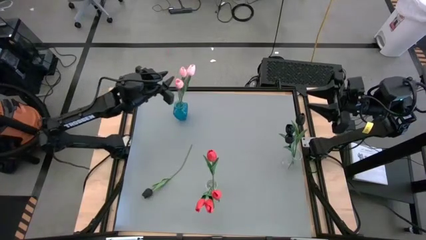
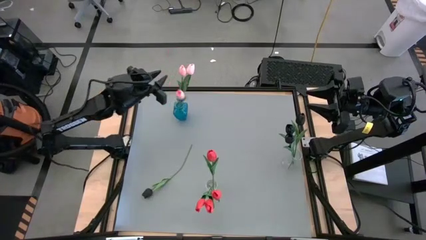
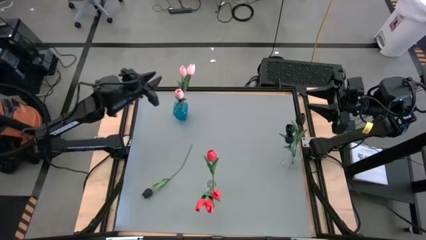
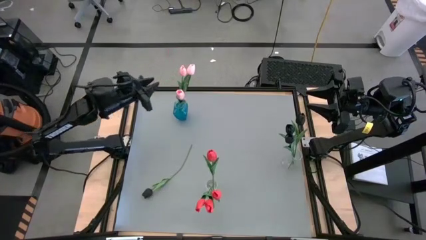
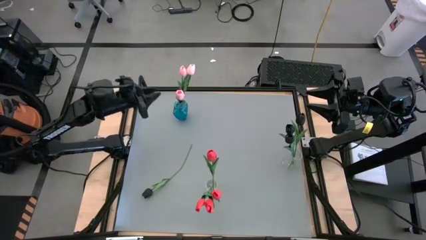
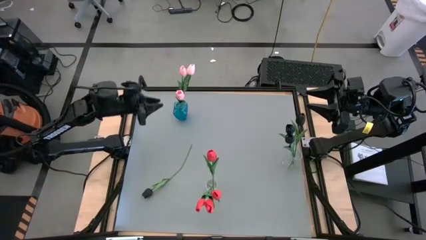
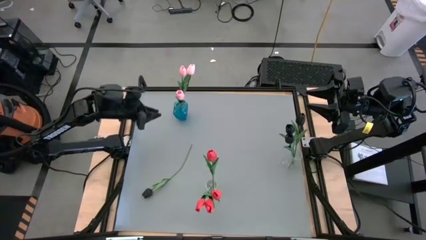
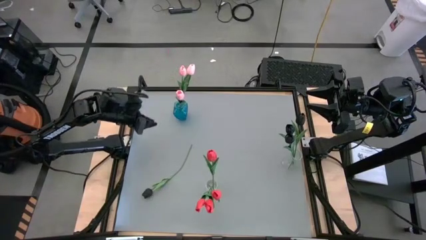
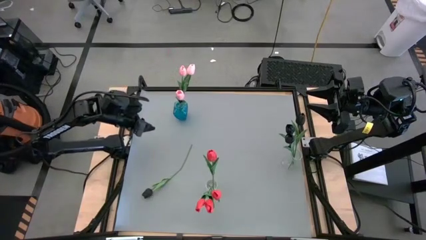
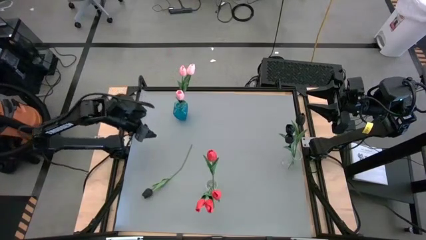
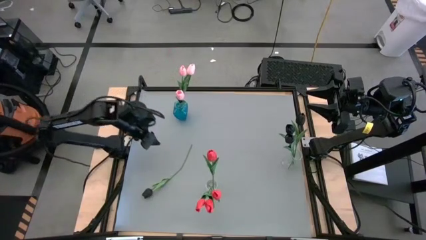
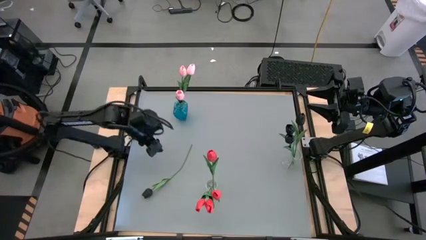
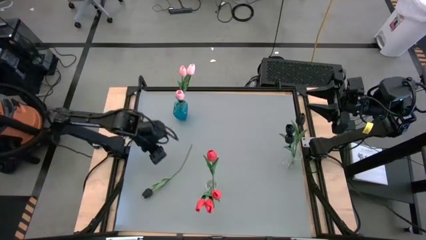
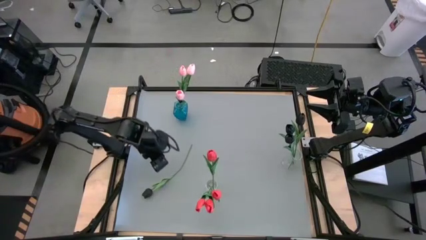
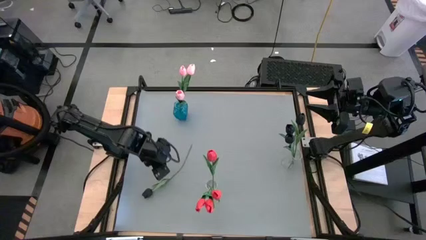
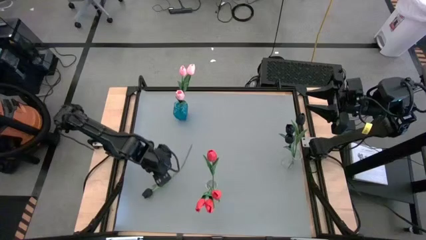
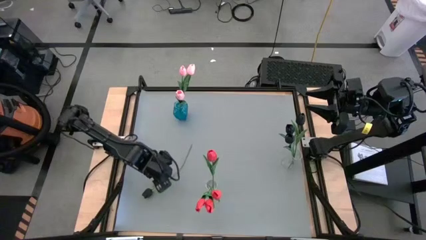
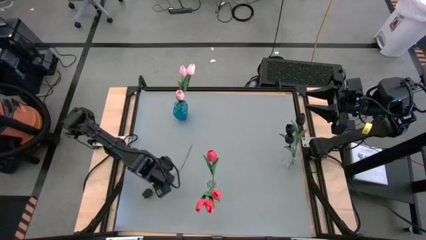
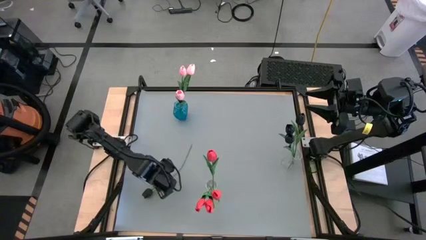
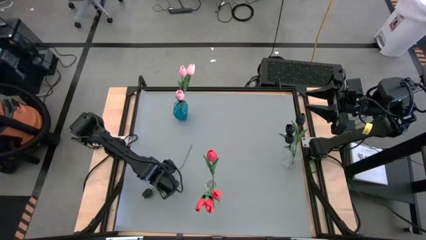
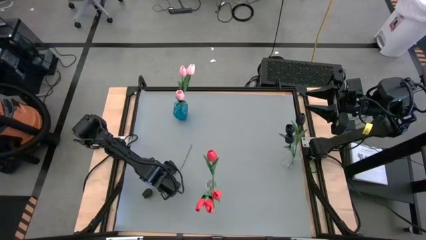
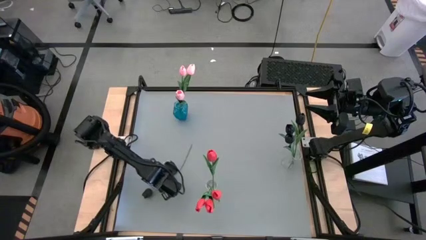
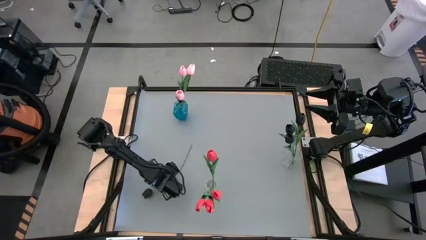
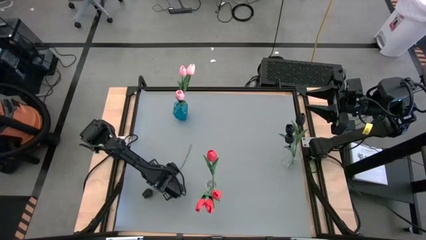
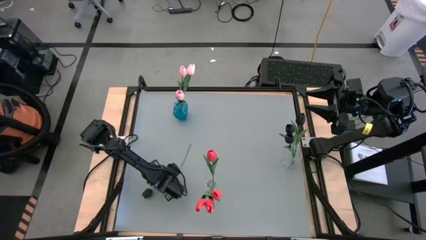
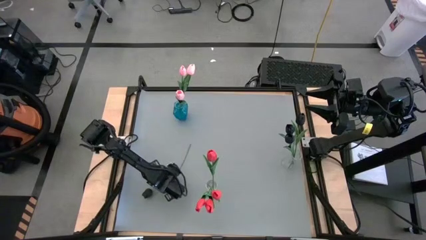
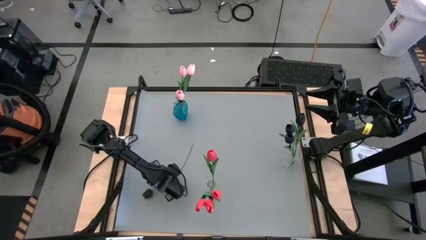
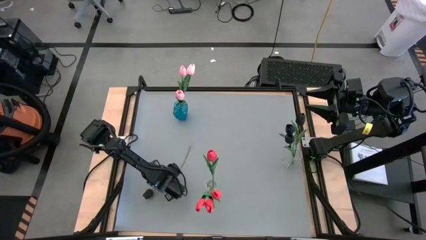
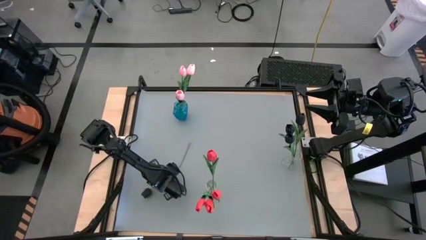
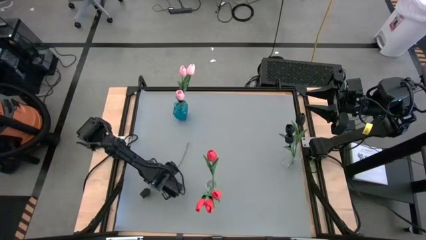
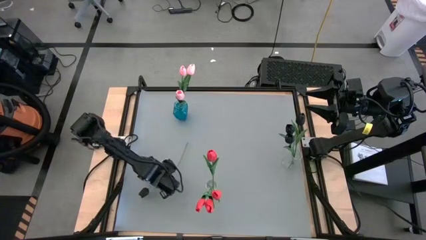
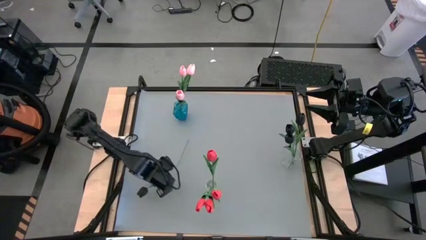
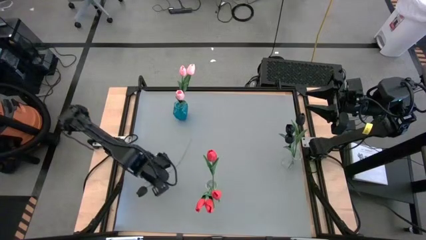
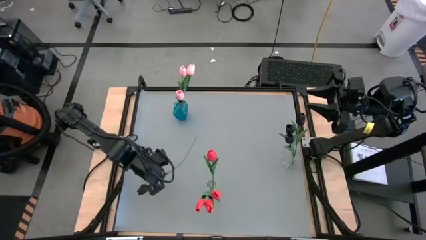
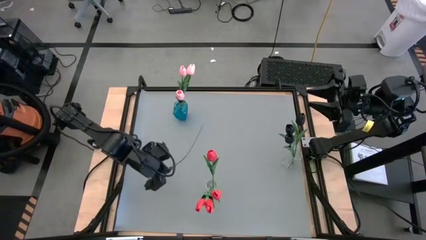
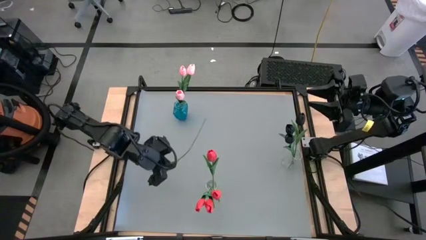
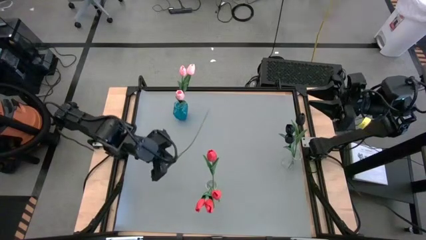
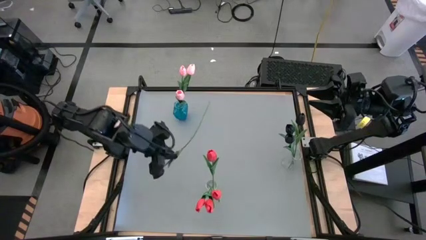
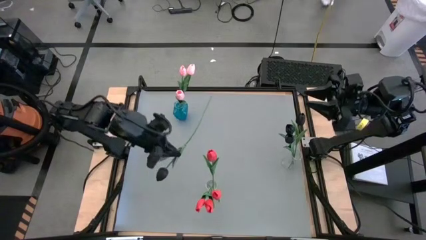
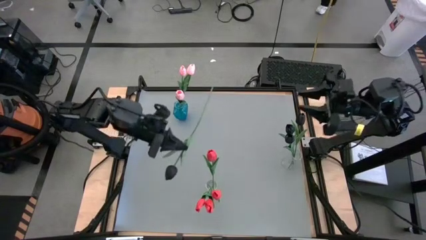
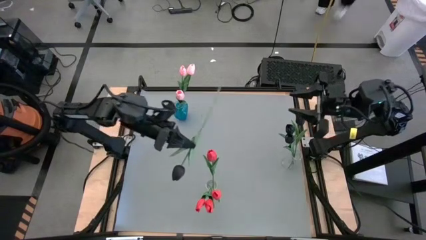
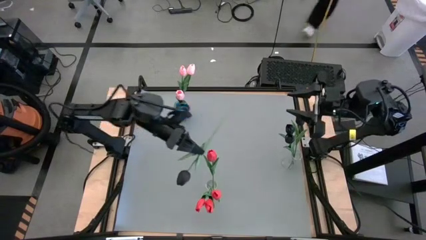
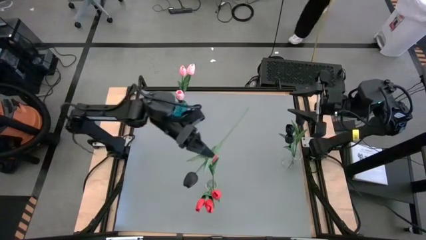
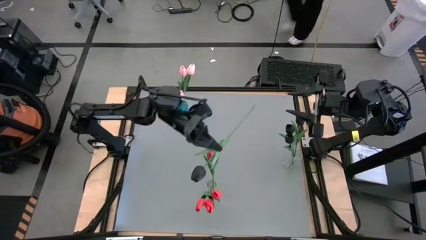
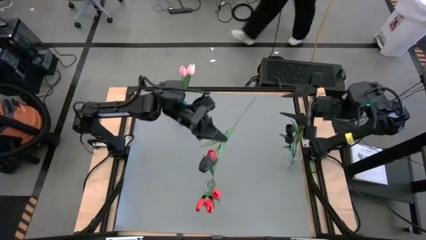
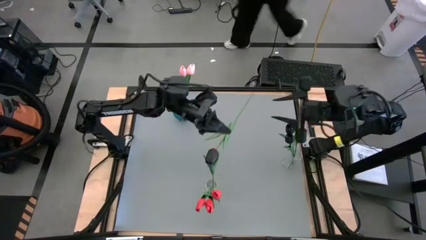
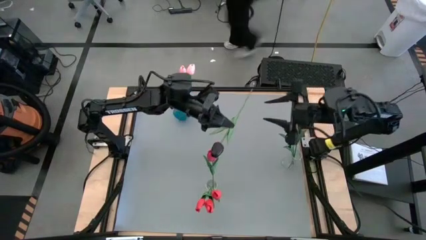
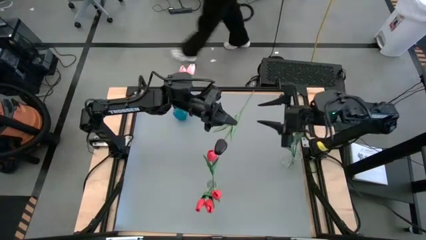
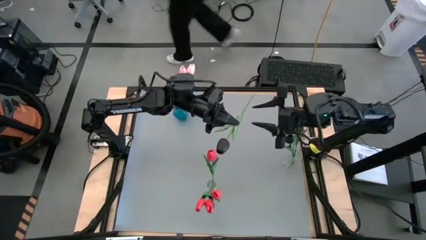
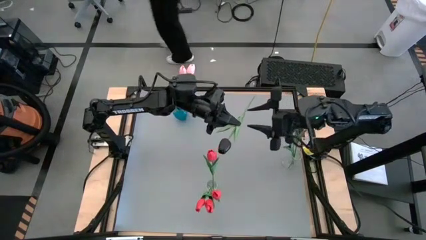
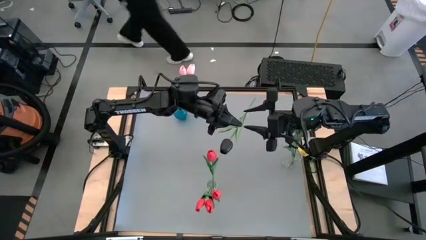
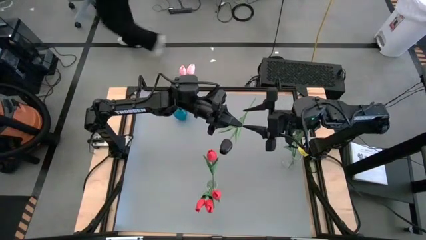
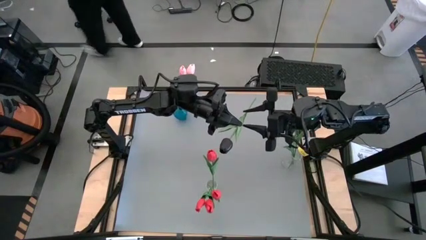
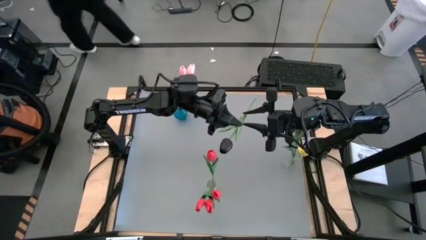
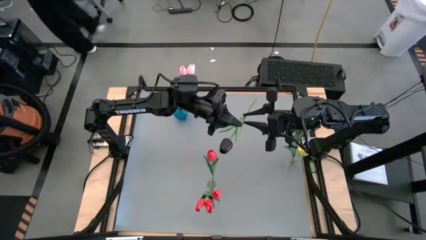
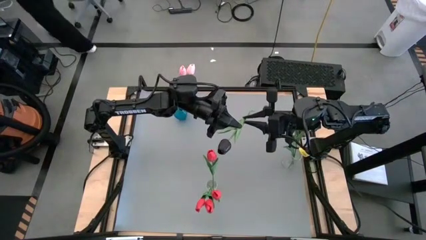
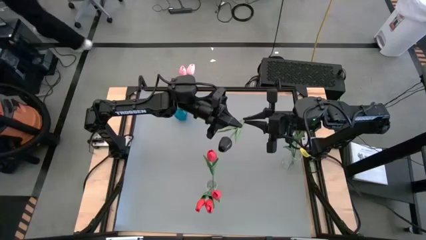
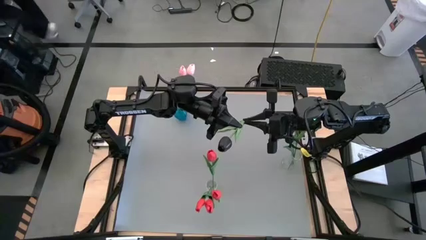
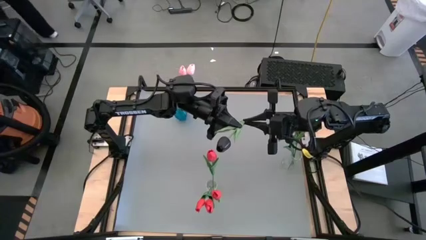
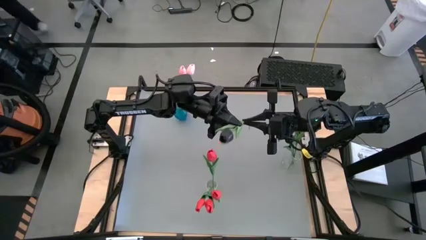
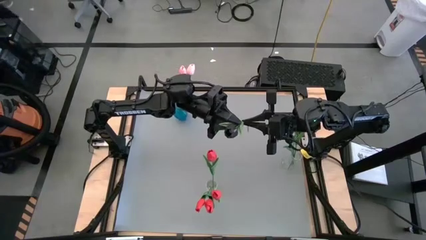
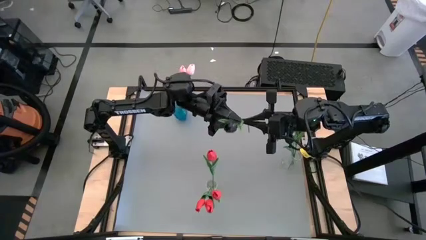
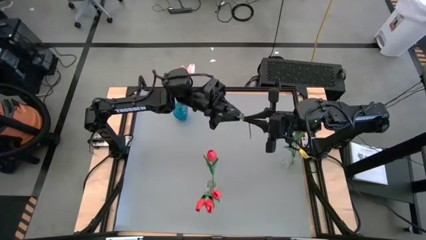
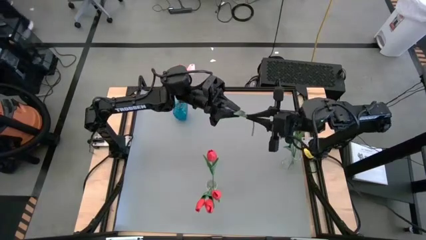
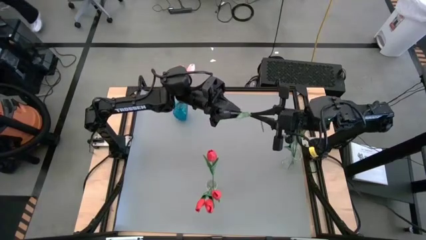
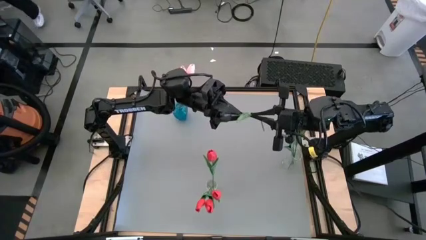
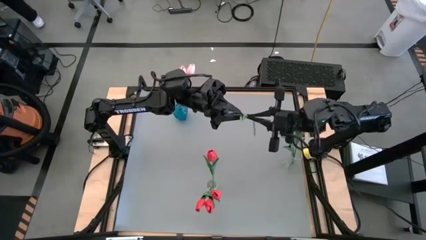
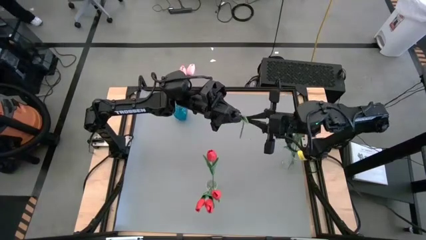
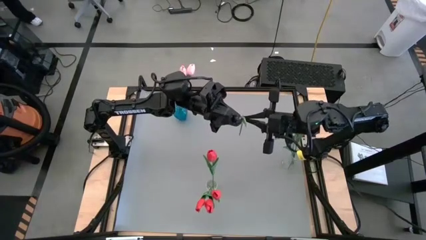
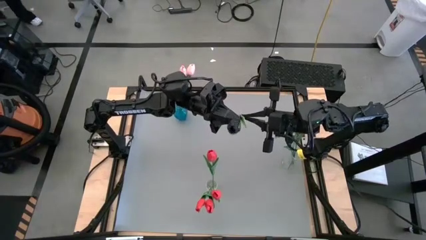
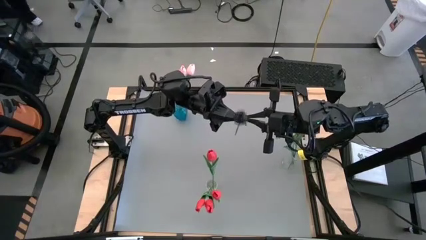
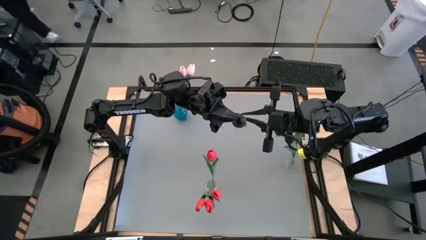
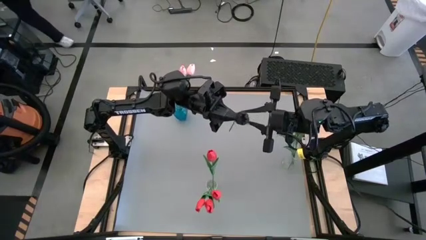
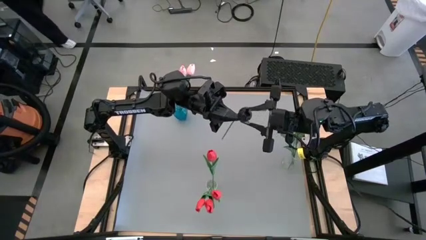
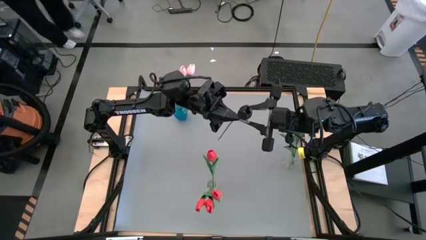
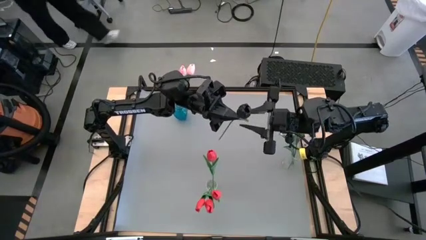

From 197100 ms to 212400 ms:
Task: Sort flowers into vase by color
Put the black flower into the right transparent vase
